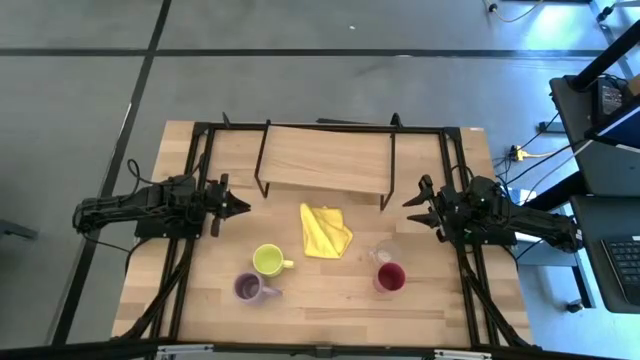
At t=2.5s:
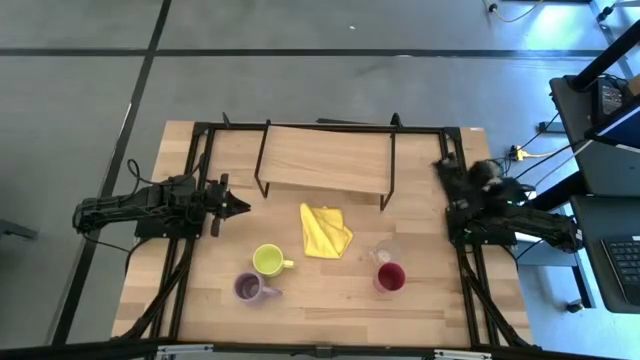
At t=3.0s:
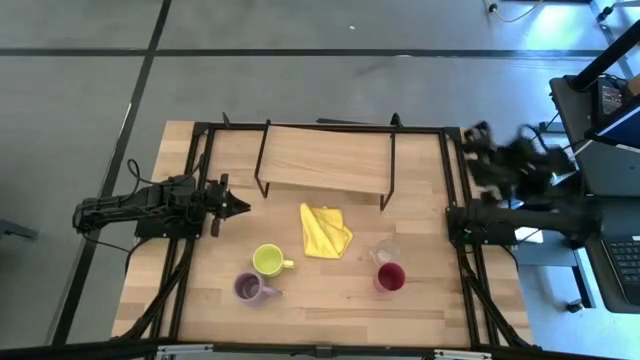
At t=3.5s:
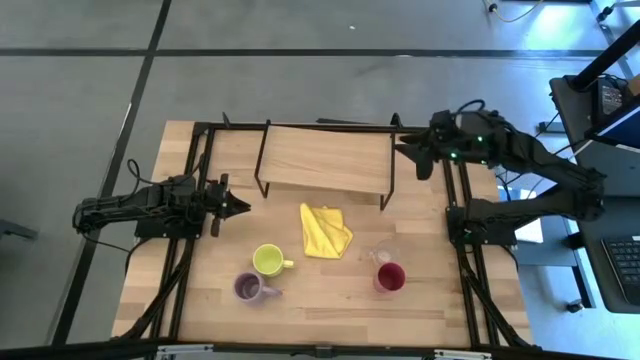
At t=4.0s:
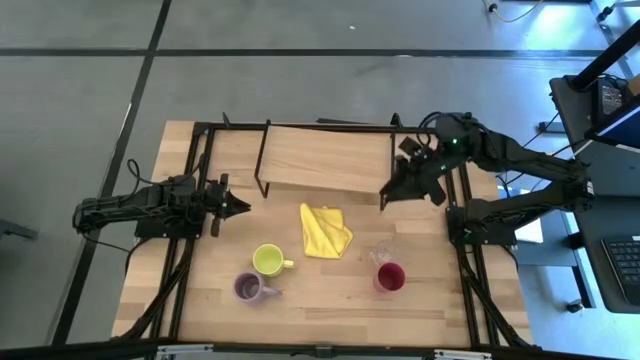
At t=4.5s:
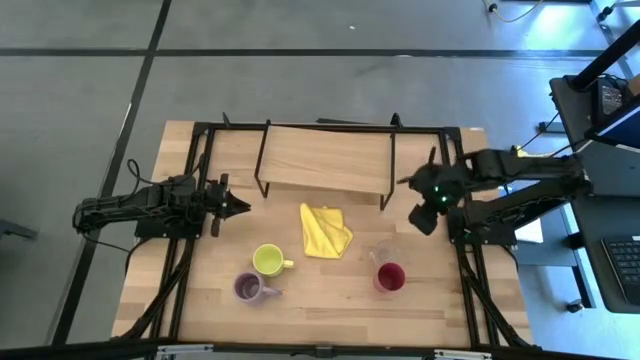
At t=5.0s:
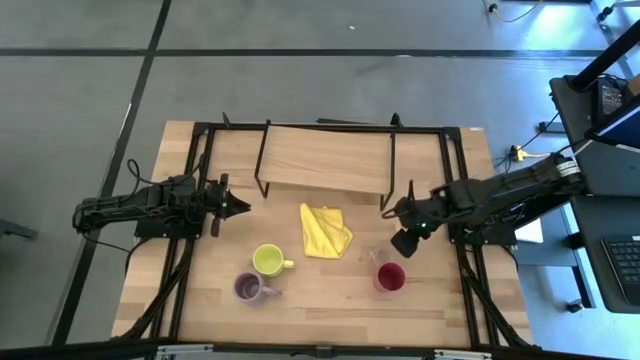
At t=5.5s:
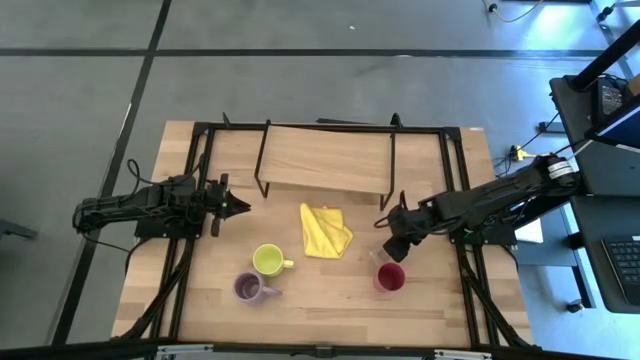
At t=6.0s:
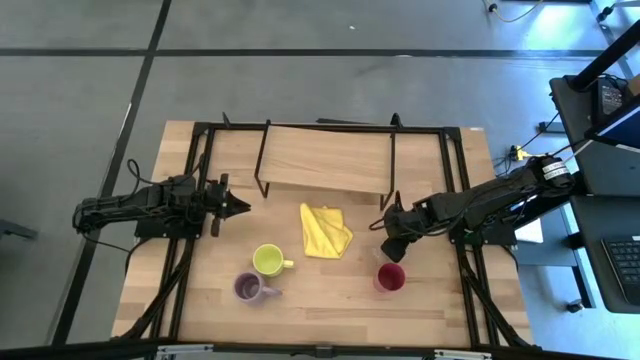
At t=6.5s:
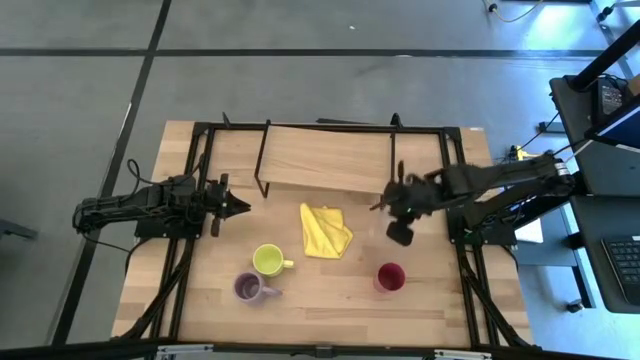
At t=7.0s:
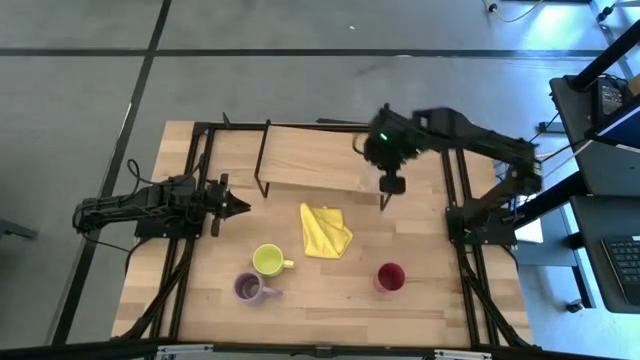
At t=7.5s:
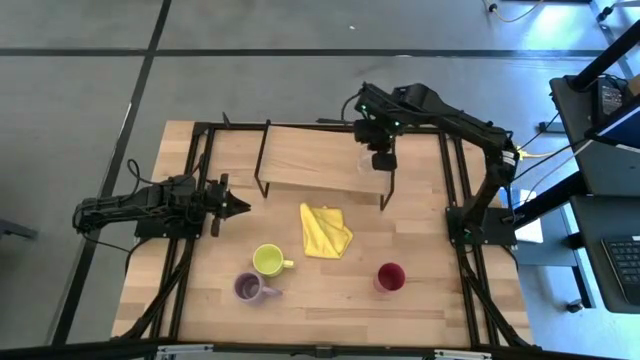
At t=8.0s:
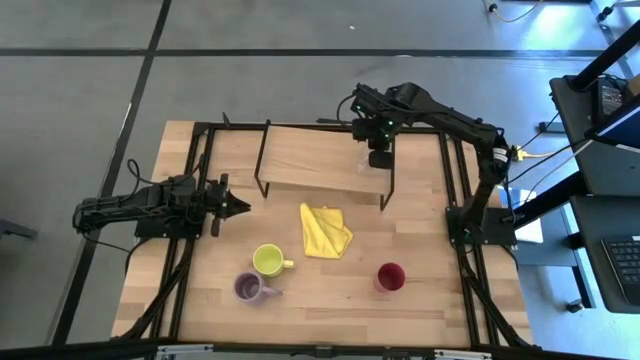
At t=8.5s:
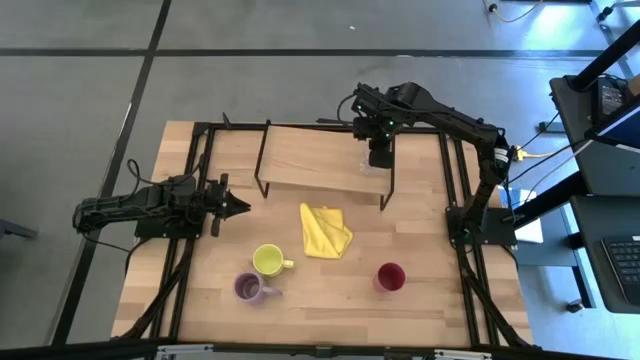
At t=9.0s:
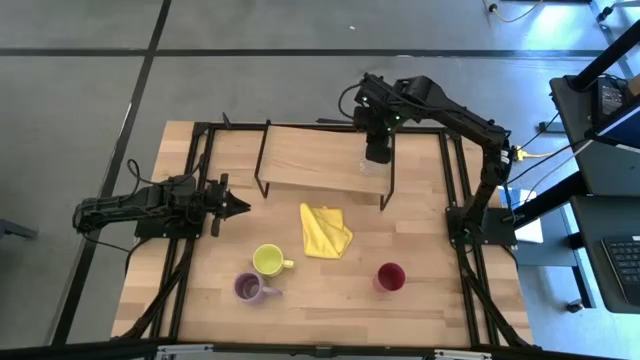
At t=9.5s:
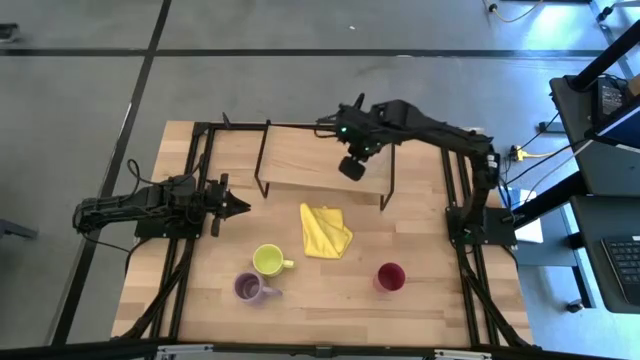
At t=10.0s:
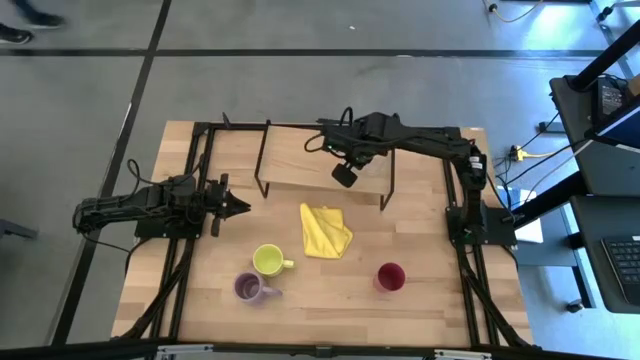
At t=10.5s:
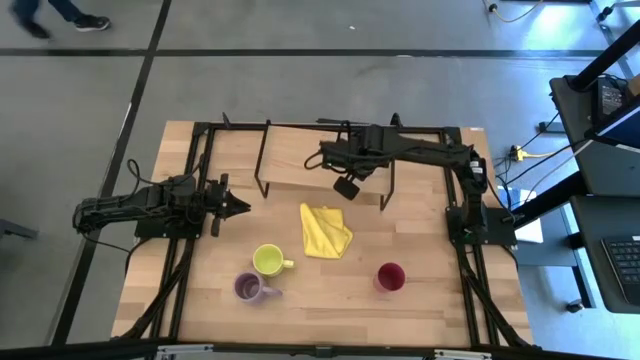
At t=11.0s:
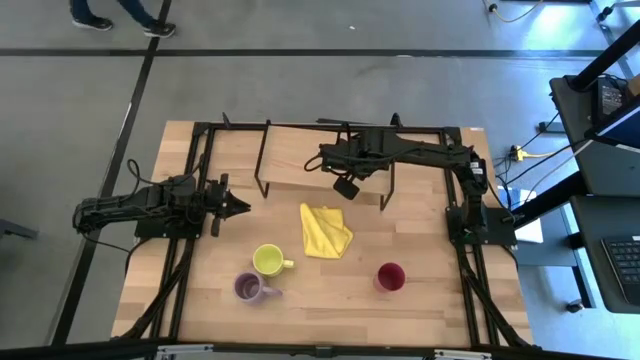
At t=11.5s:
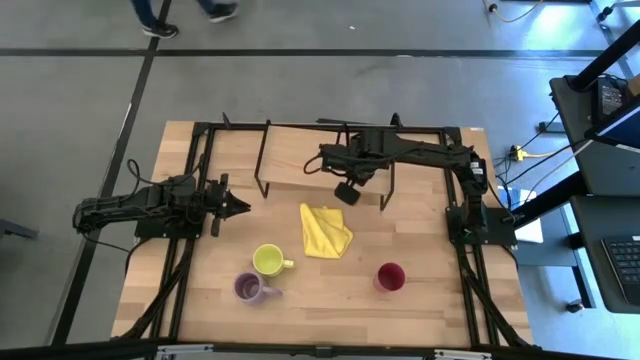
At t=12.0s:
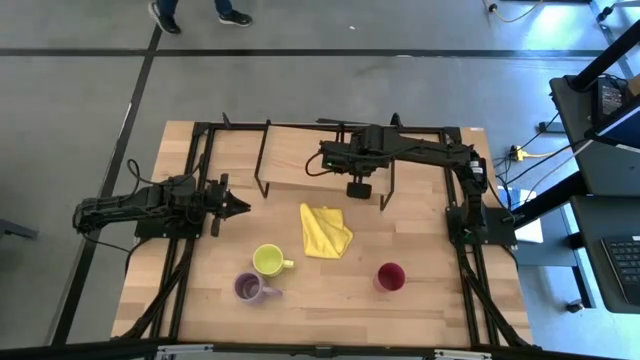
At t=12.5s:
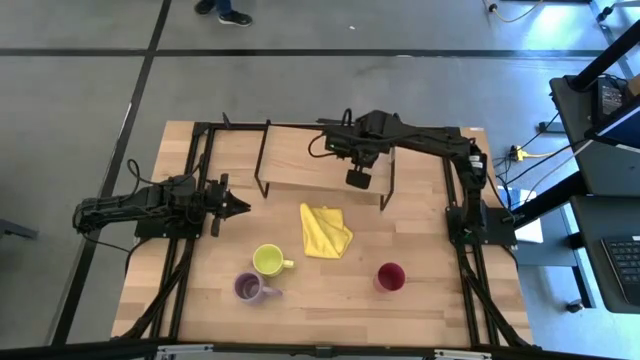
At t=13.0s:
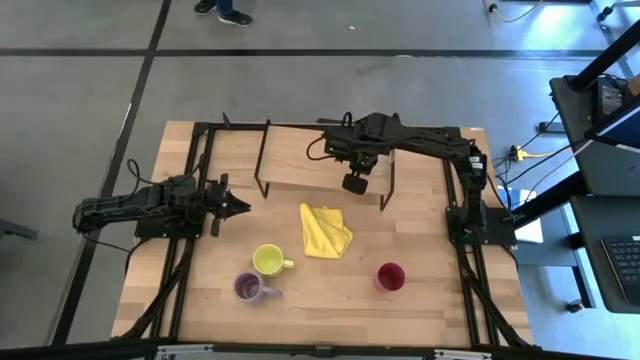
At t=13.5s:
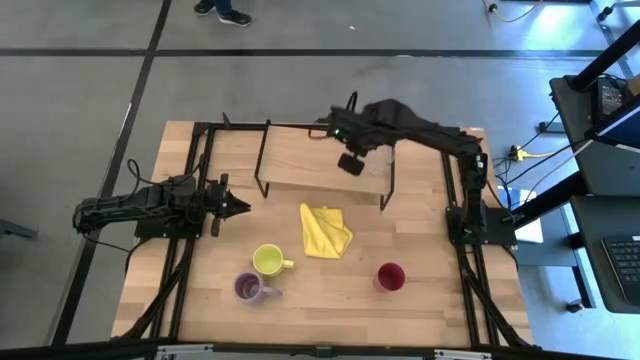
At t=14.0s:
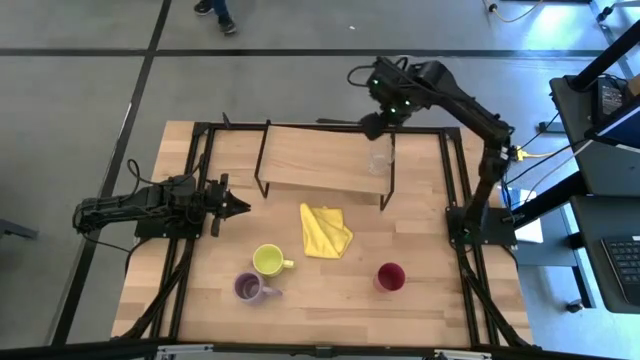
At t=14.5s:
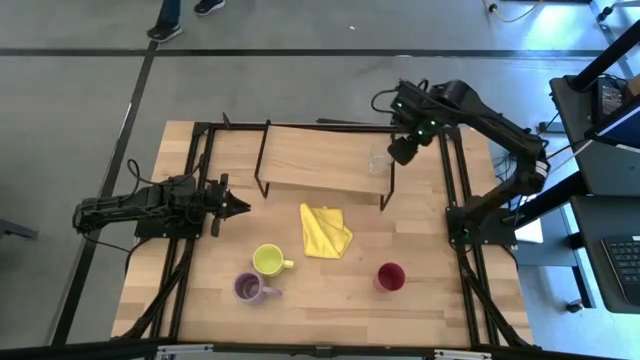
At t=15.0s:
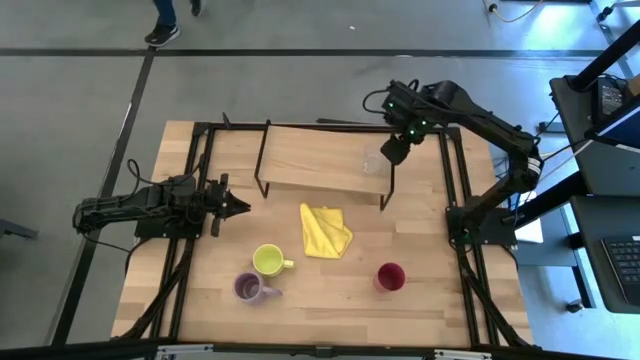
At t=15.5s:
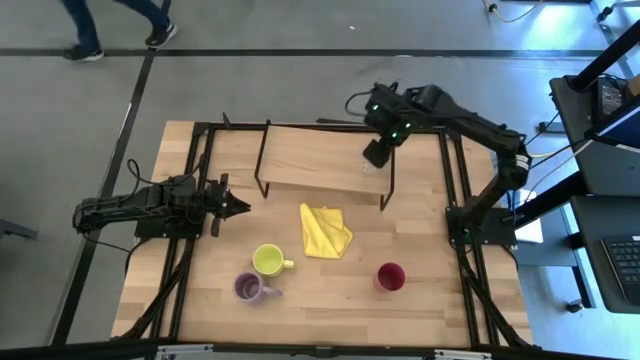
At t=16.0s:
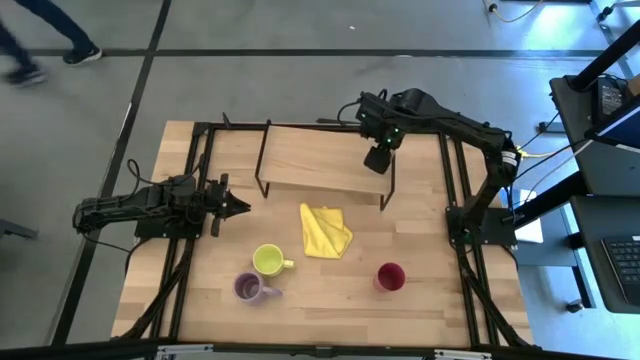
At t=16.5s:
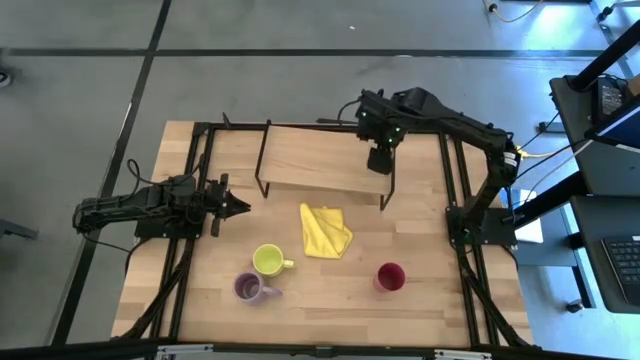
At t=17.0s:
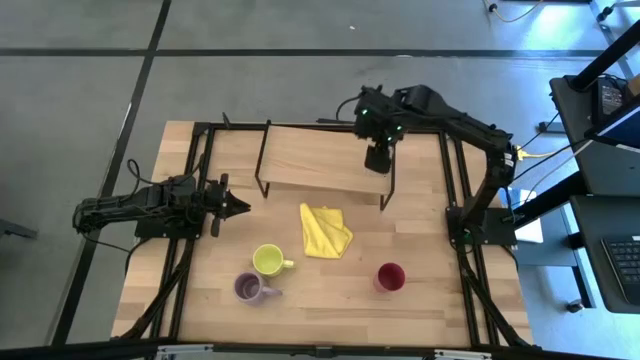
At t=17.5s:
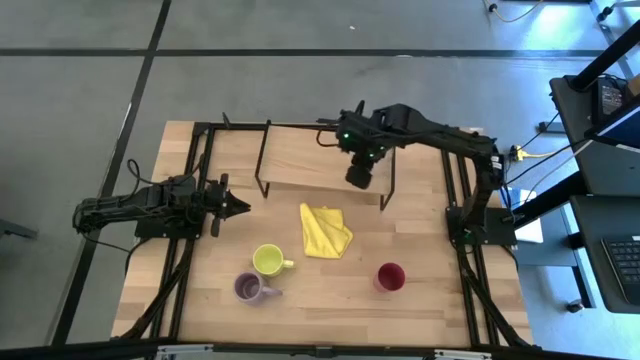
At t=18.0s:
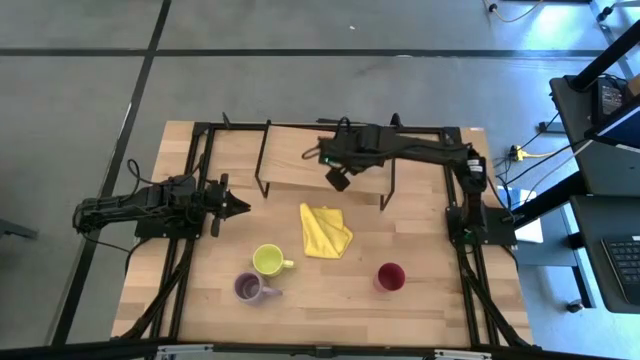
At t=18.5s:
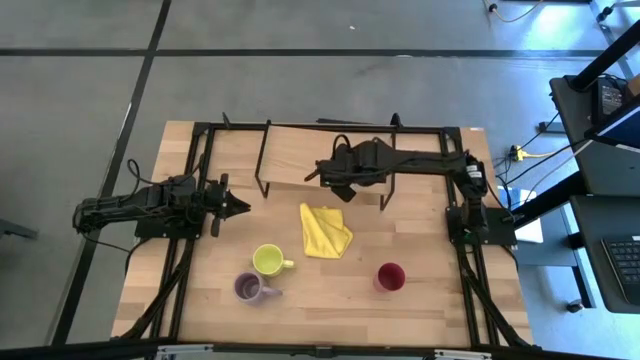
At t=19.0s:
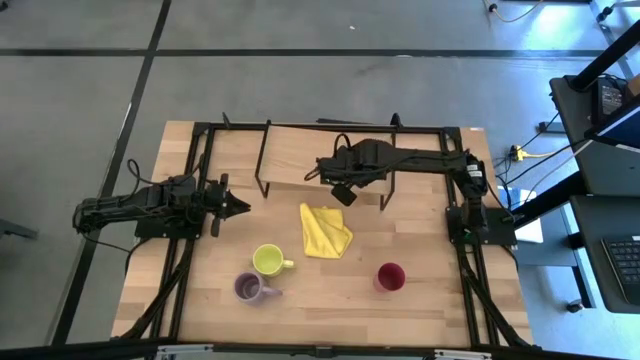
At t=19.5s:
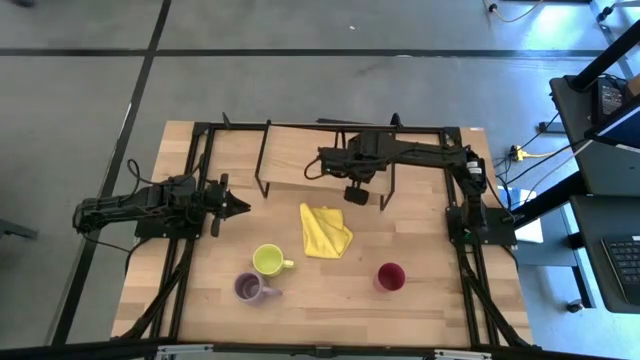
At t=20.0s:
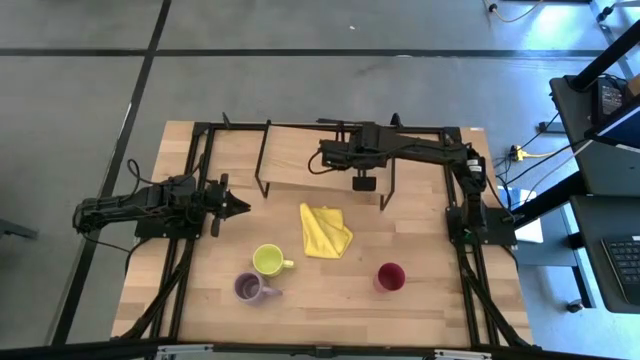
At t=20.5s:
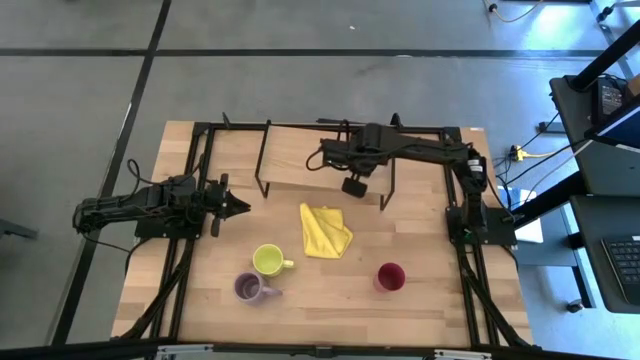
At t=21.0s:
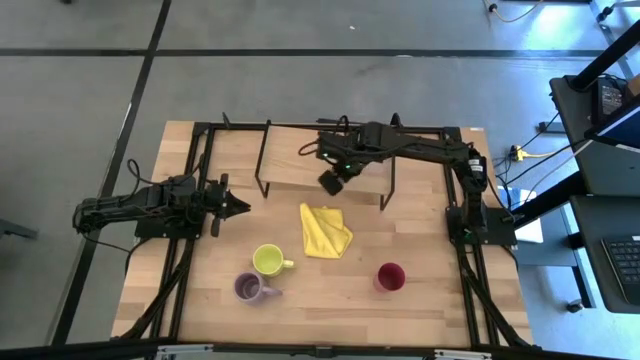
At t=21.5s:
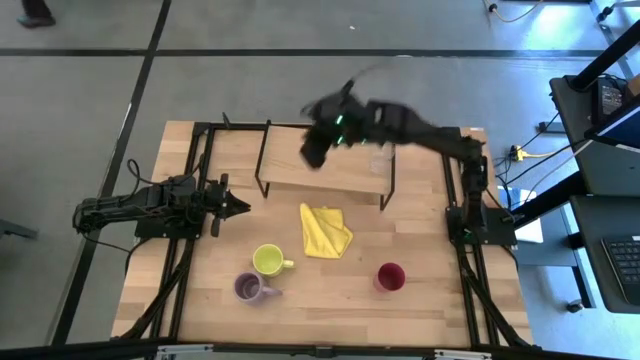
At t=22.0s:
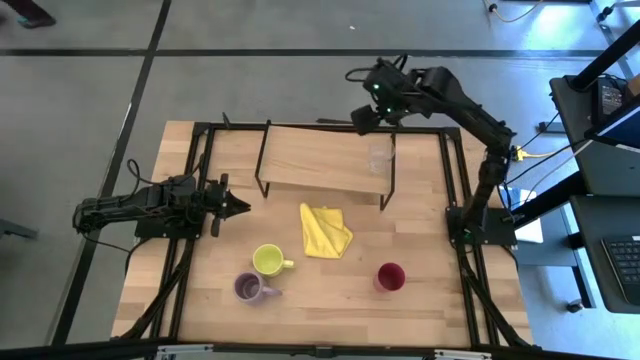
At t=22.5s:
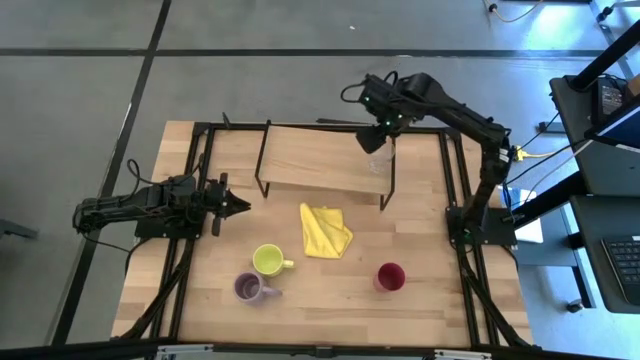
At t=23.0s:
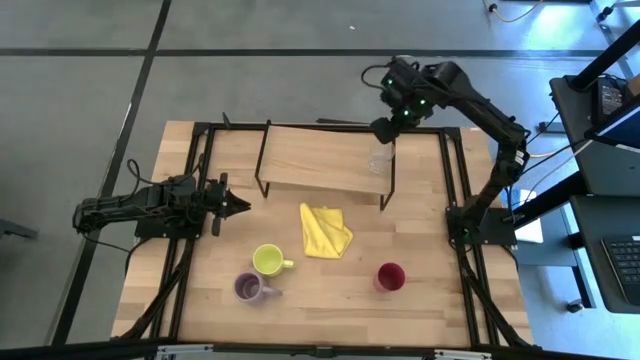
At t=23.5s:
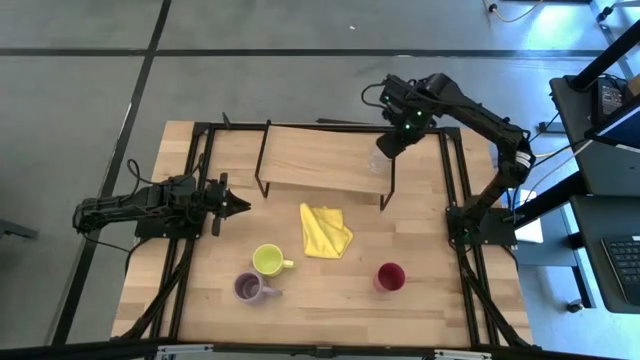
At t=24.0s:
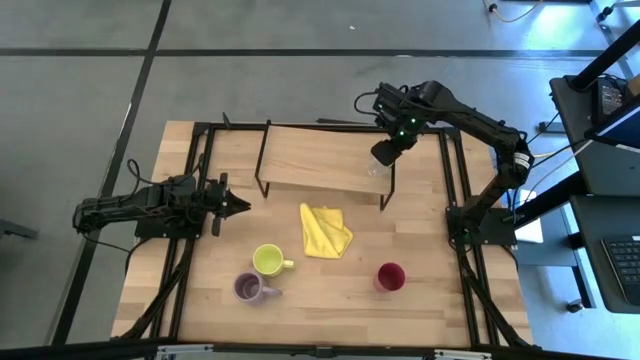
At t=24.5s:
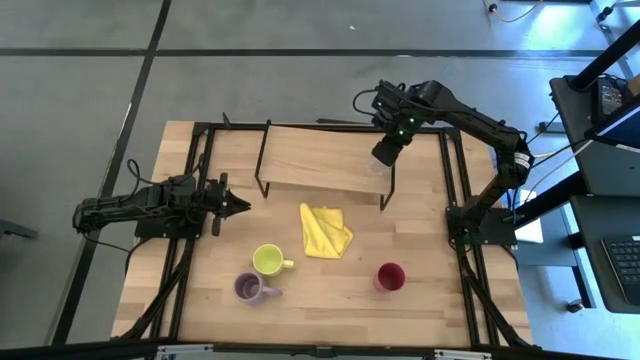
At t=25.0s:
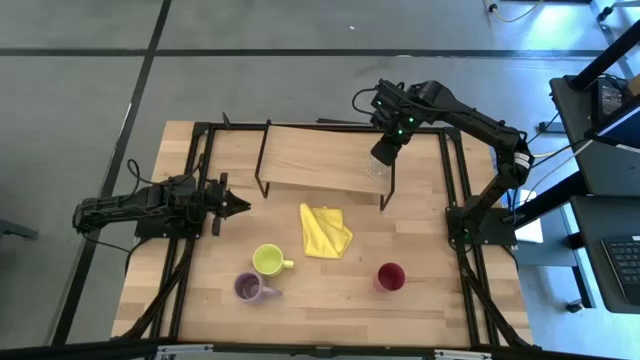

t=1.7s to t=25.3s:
Task: Stack small to large cups/mugs on shelf
Put the transparent mug to the right on the shelf
